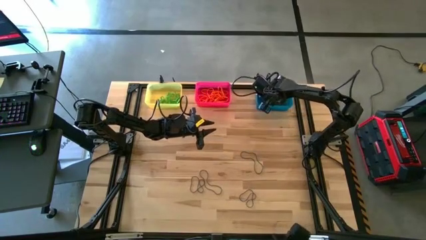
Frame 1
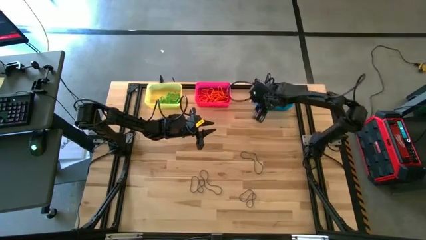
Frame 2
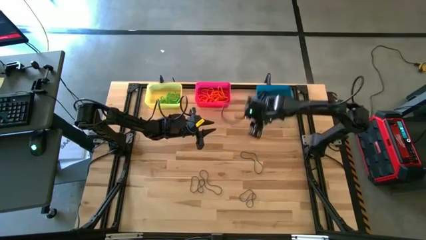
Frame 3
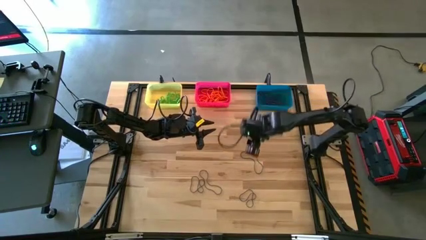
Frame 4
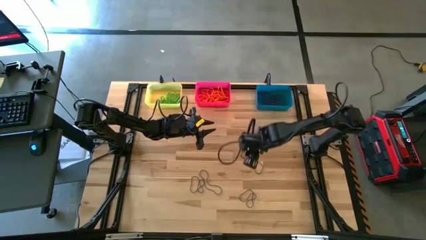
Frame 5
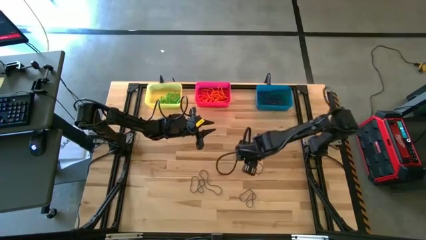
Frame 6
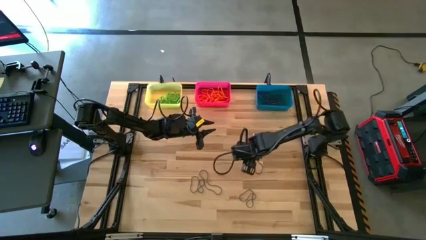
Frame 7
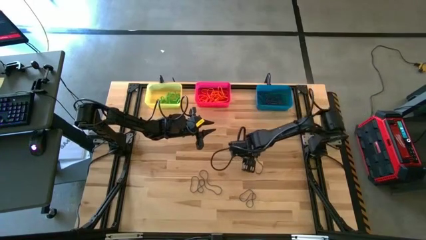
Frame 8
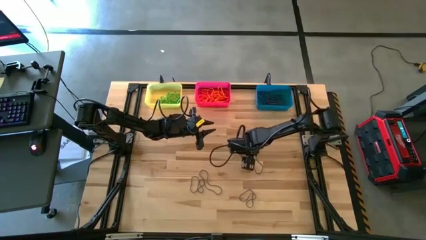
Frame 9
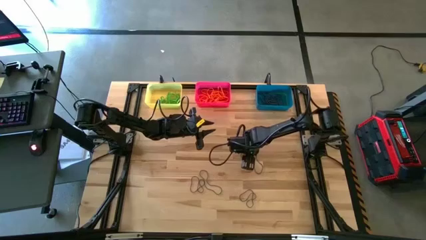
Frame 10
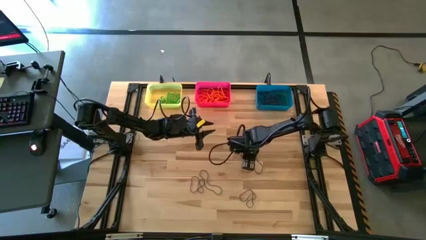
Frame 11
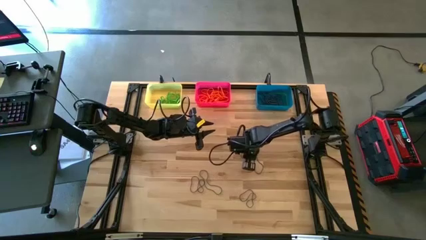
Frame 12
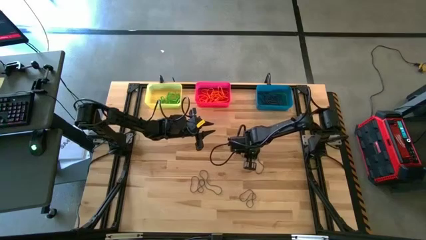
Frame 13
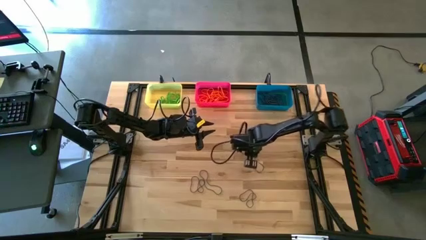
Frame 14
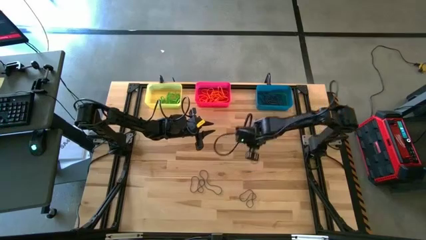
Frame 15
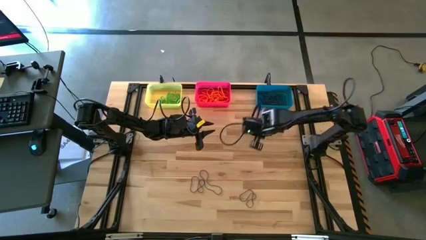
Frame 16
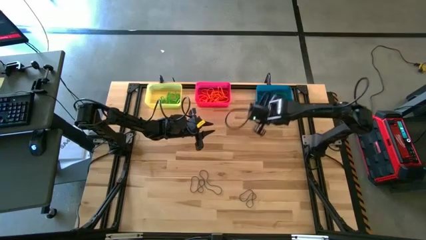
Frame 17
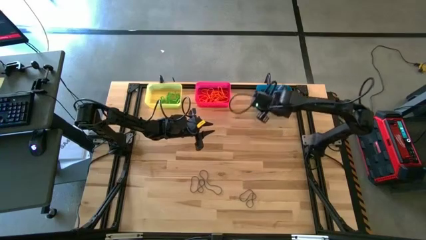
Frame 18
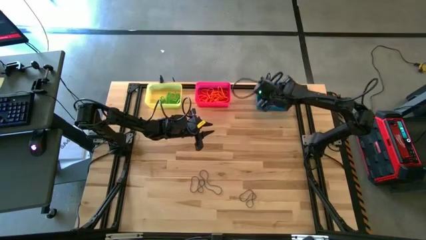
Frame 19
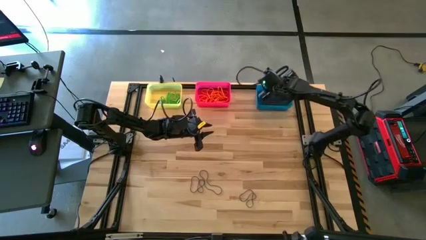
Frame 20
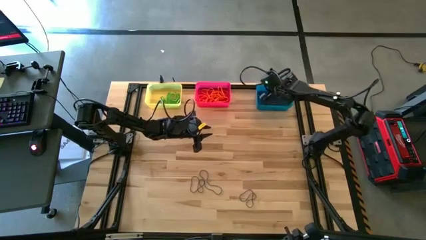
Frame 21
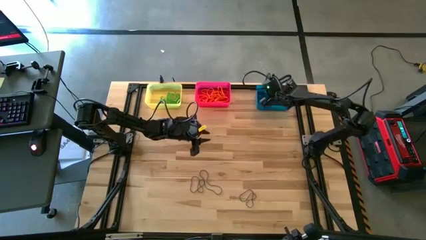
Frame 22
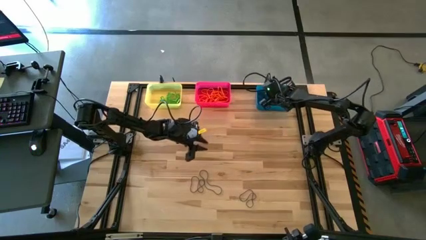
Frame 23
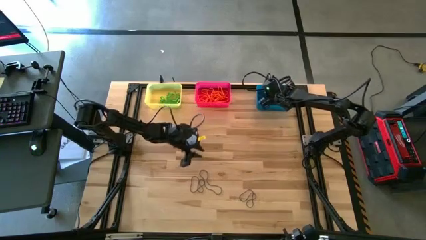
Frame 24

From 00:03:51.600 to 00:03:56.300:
Task: Sort rubber bands into baskets
Put the violet rubber band into the blue bin

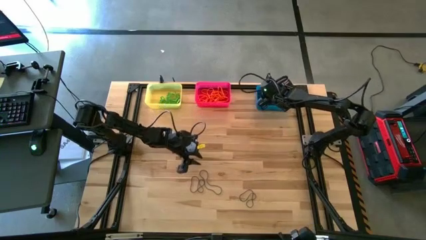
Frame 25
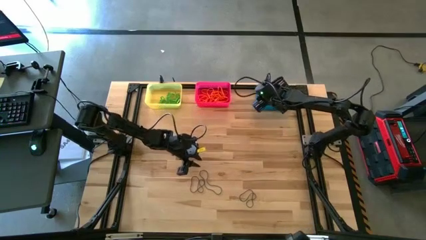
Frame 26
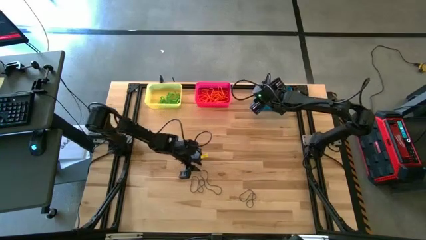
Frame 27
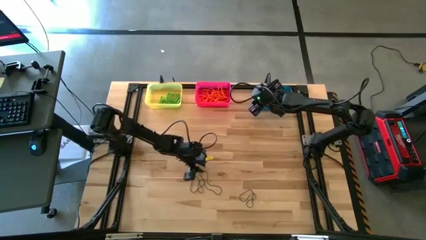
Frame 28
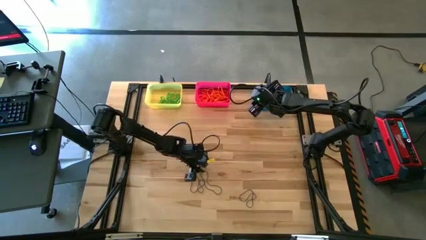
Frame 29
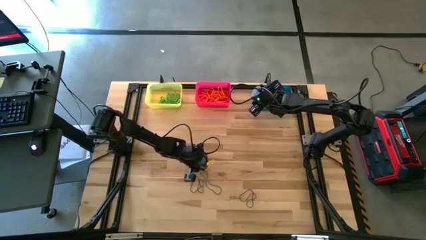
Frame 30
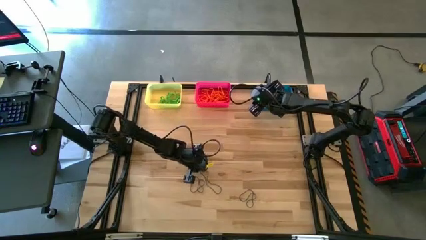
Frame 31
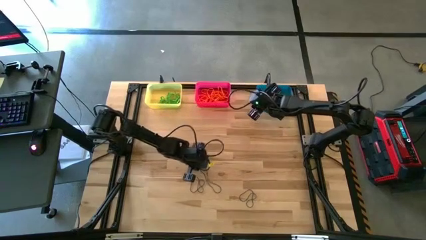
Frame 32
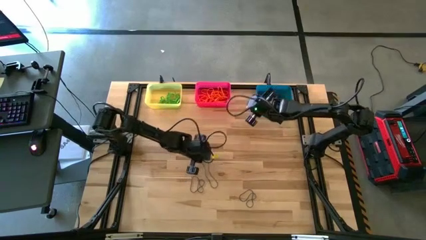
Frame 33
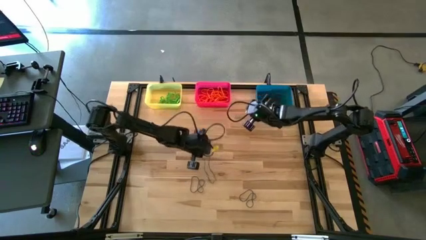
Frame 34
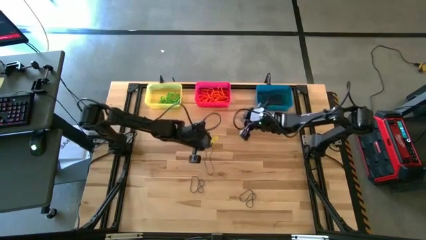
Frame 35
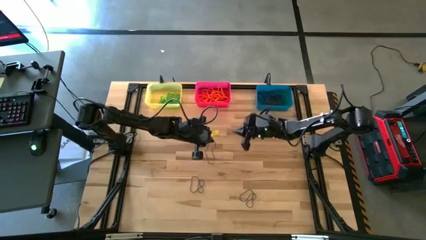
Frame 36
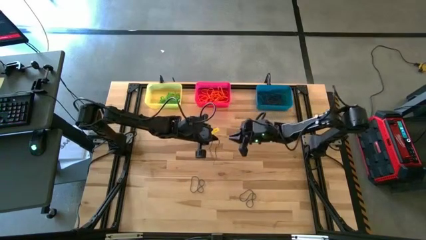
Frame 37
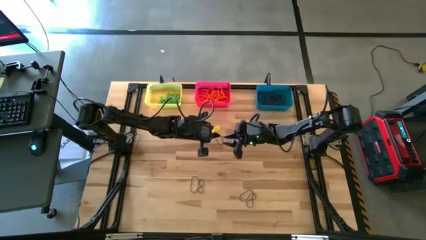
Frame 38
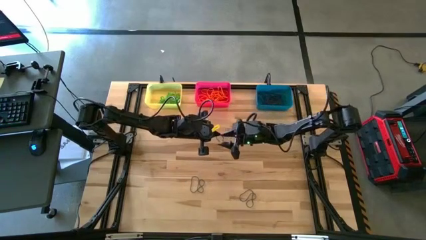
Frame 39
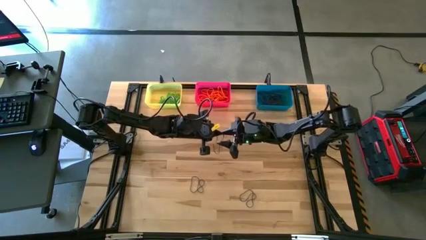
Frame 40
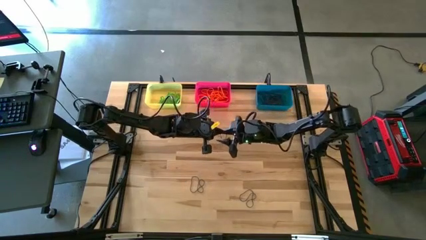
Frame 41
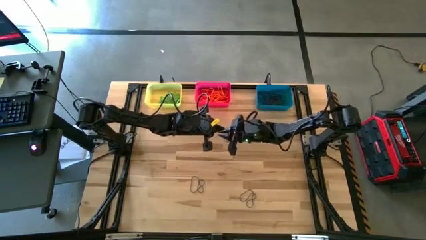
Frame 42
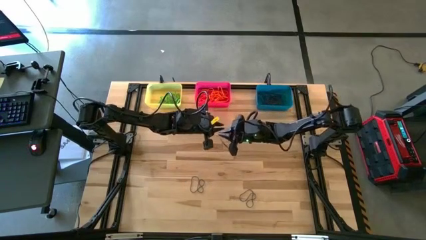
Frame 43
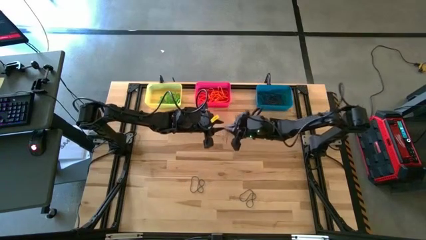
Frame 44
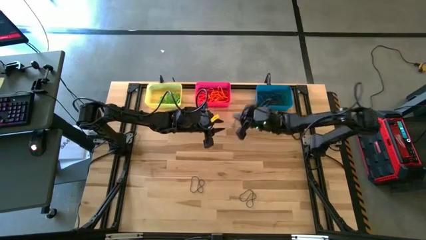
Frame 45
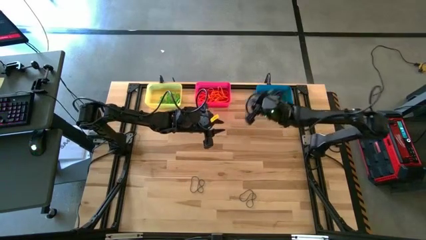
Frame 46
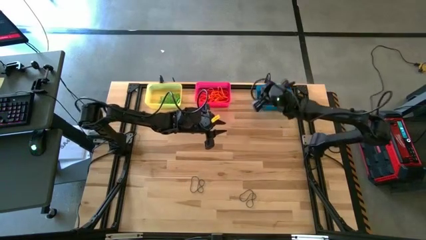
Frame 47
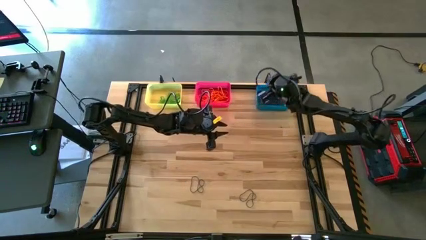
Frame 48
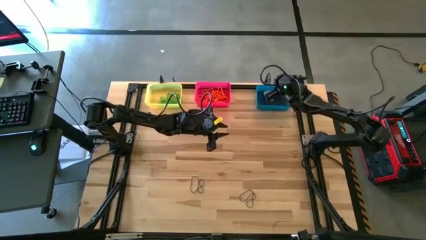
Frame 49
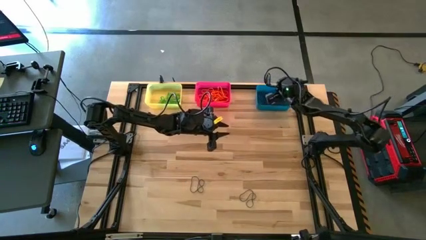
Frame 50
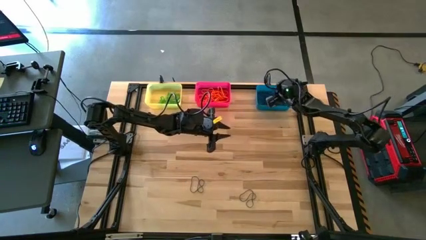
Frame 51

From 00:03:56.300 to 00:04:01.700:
Put the violet rubber band into the blue bin

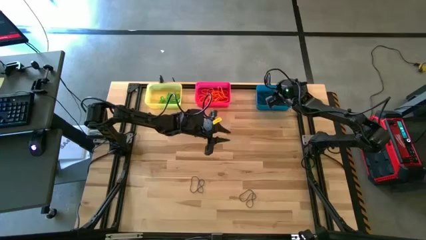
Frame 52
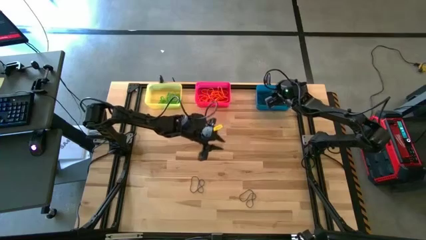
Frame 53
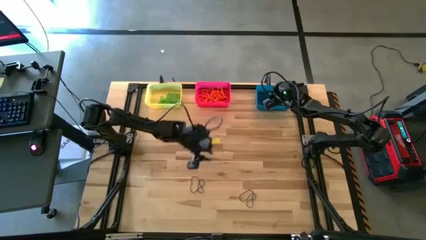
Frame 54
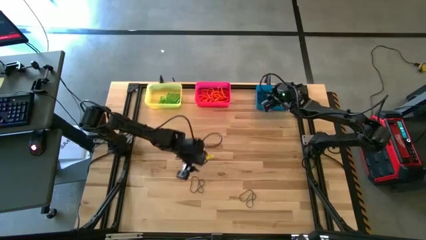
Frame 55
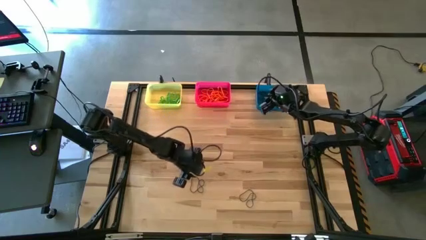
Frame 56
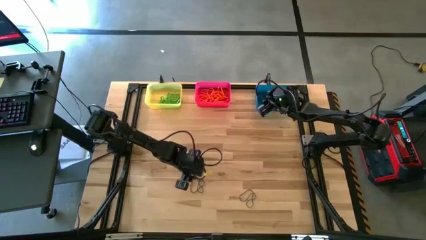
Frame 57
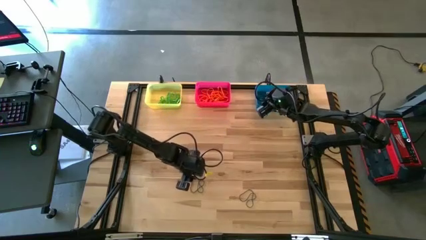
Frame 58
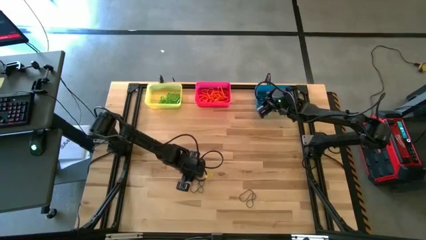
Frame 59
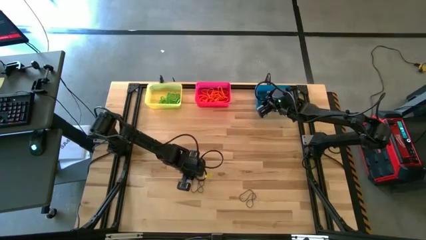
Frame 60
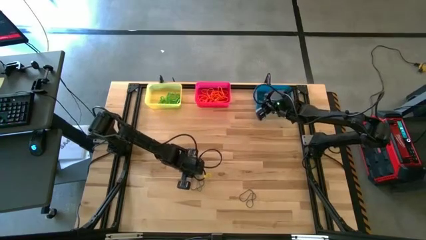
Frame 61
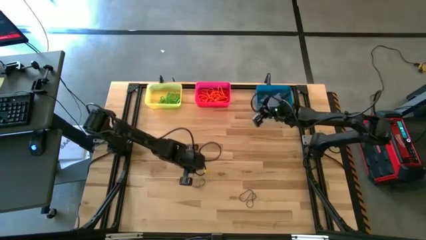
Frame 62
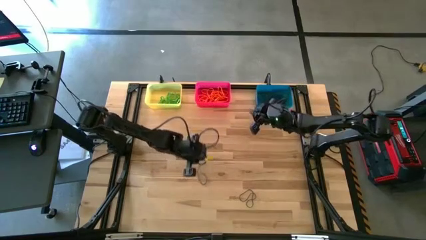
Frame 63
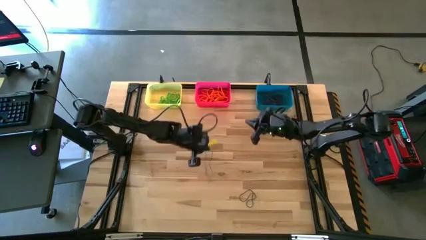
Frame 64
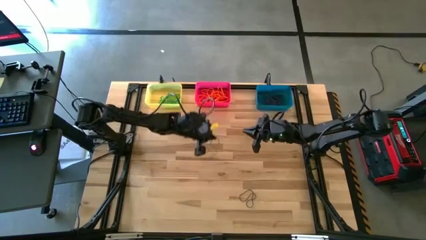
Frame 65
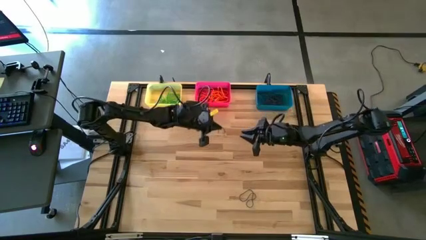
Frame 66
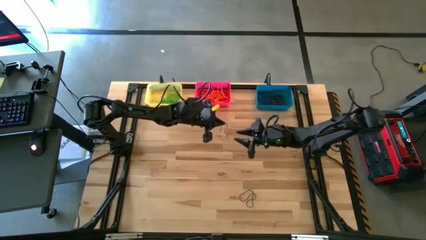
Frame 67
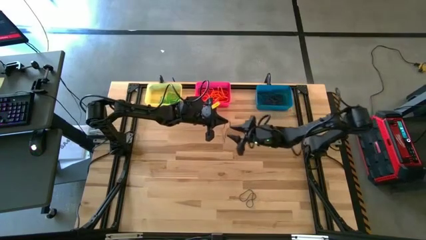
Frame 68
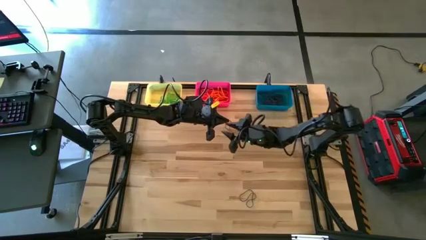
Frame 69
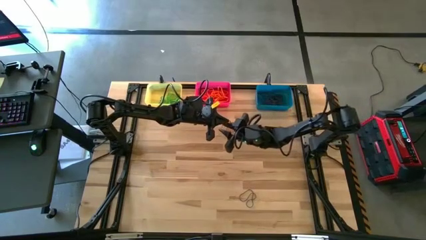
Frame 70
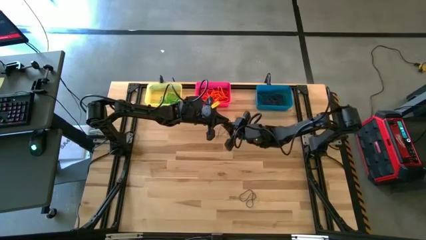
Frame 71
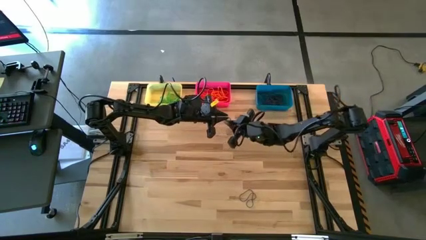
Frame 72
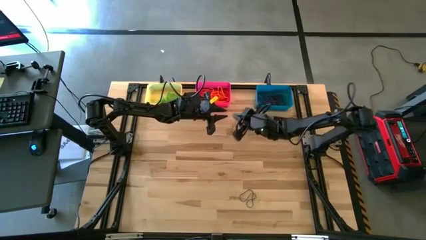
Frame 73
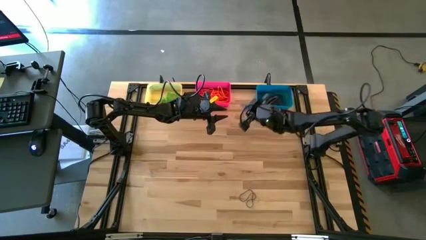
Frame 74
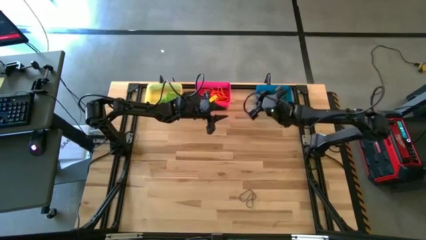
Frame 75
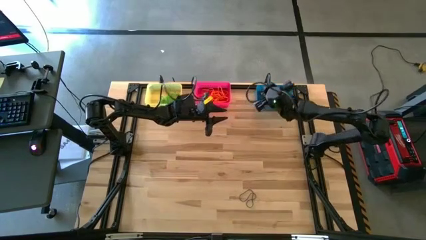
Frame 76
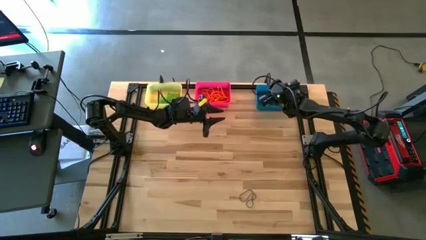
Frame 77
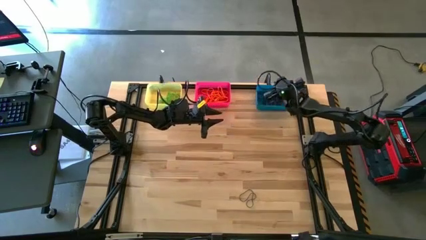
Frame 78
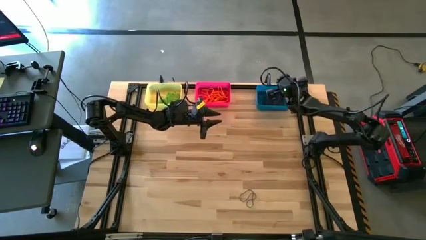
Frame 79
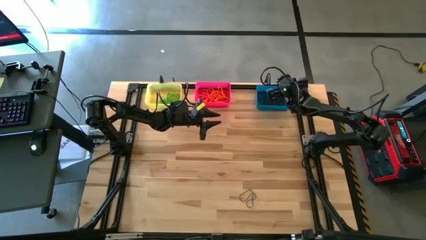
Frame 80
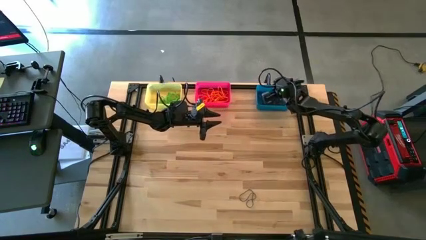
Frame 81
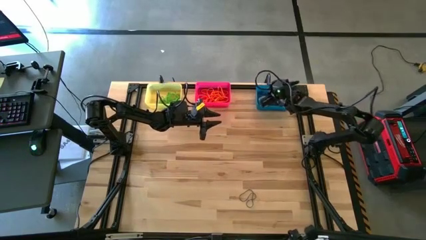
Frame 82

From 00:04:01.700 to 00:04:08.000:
Put the violet rubber band into the blue bin
